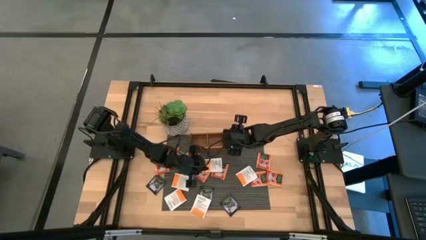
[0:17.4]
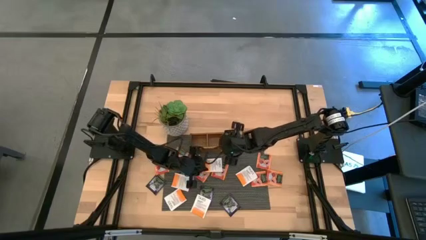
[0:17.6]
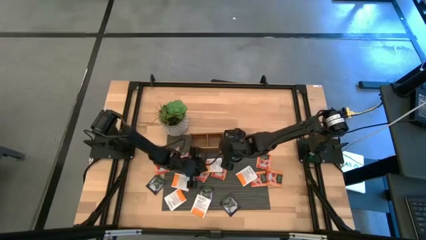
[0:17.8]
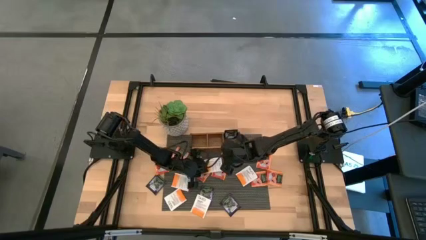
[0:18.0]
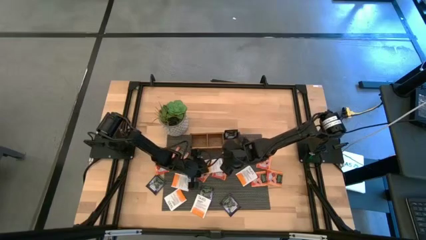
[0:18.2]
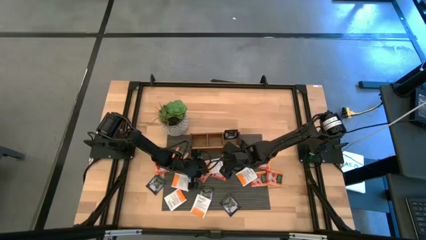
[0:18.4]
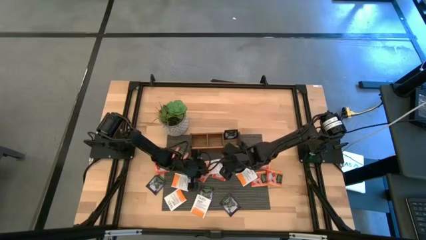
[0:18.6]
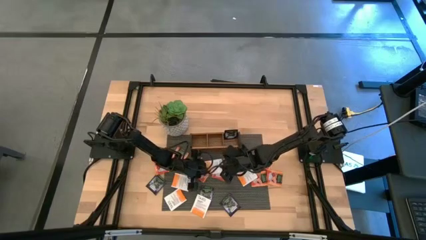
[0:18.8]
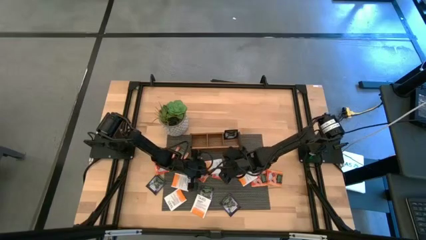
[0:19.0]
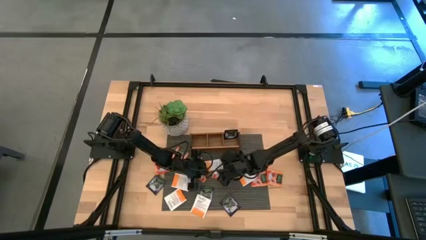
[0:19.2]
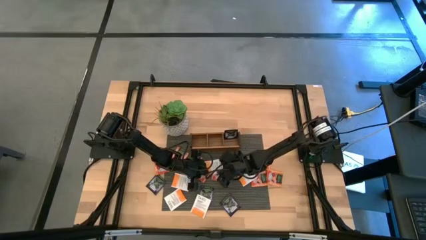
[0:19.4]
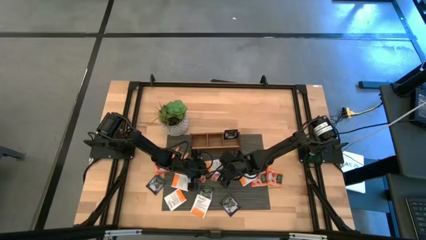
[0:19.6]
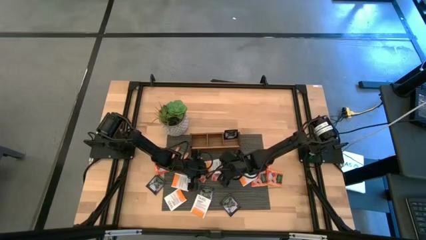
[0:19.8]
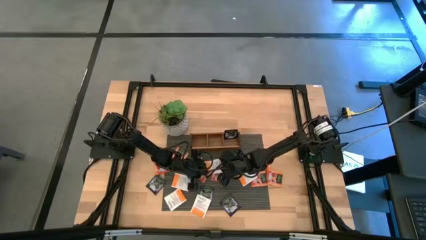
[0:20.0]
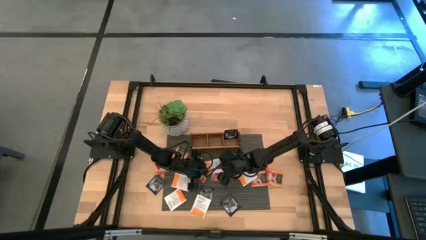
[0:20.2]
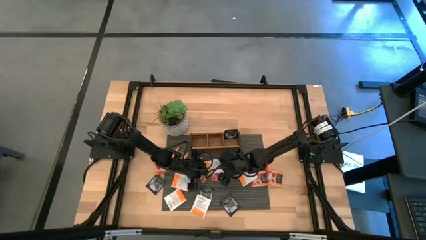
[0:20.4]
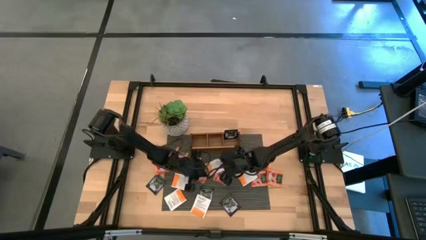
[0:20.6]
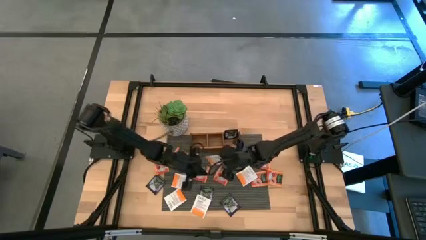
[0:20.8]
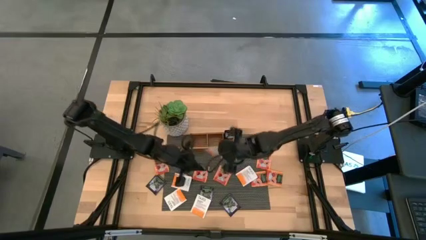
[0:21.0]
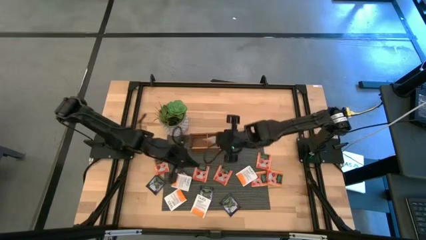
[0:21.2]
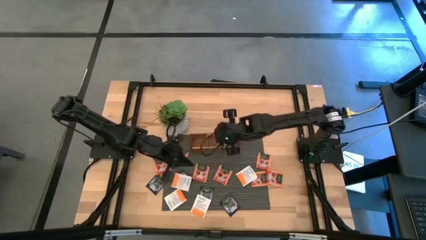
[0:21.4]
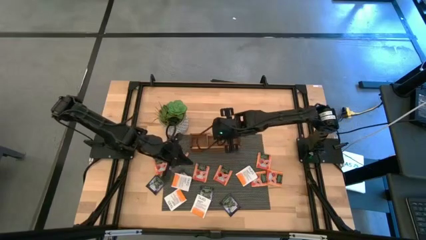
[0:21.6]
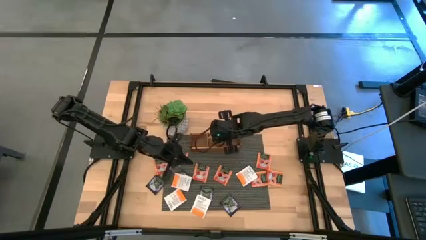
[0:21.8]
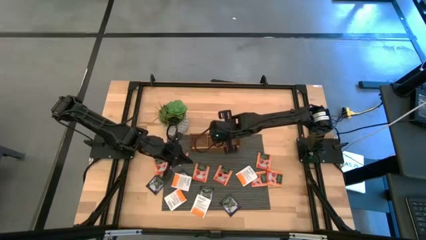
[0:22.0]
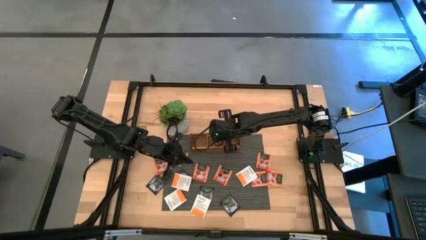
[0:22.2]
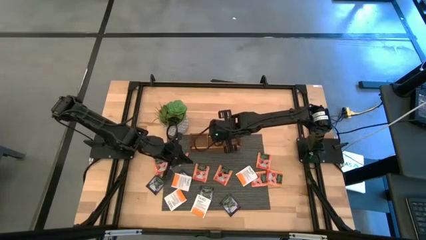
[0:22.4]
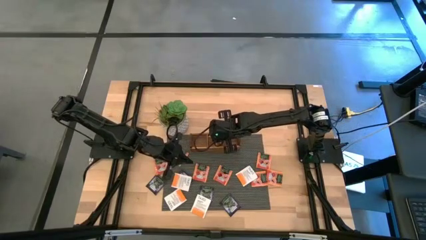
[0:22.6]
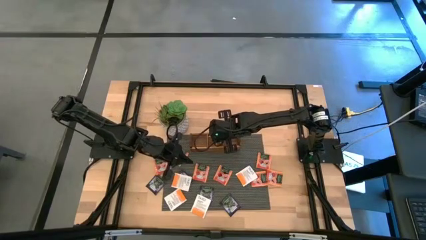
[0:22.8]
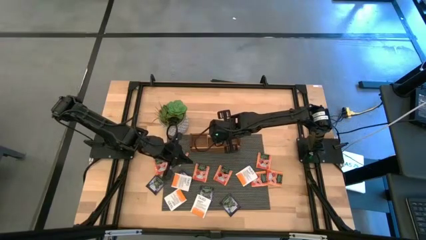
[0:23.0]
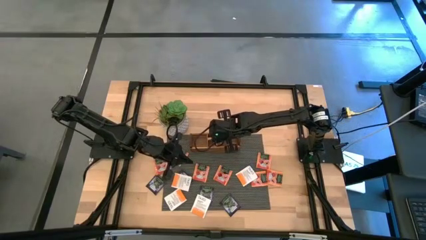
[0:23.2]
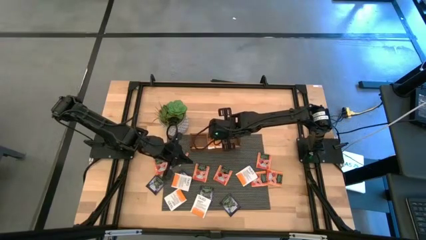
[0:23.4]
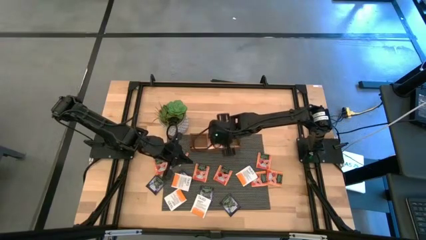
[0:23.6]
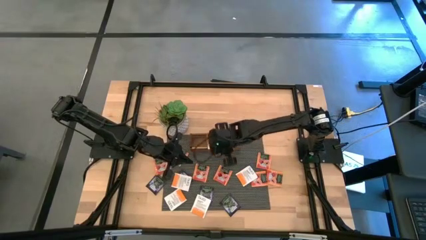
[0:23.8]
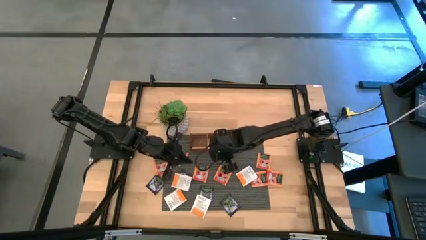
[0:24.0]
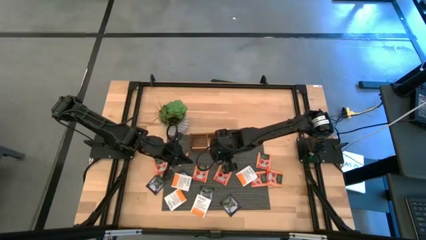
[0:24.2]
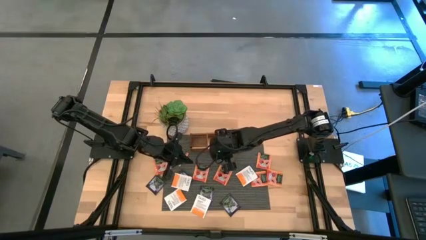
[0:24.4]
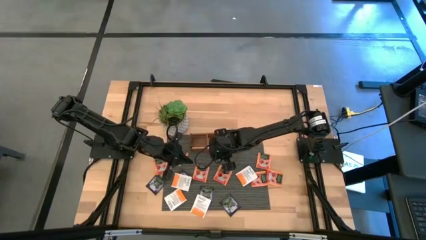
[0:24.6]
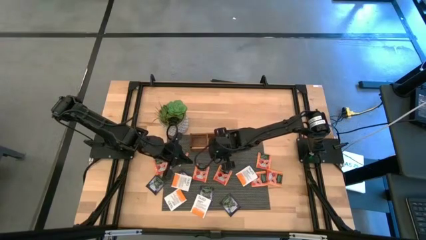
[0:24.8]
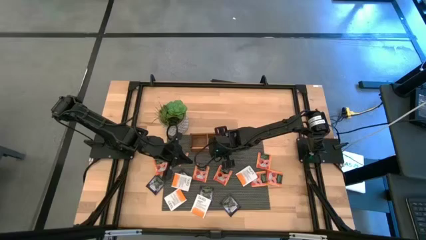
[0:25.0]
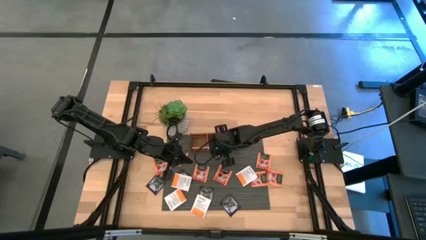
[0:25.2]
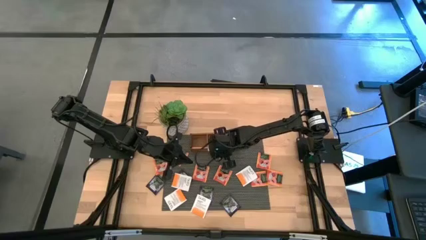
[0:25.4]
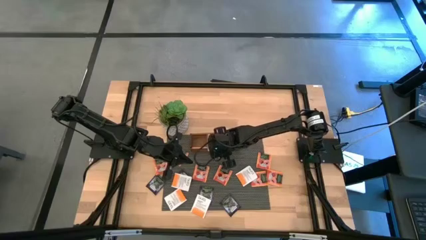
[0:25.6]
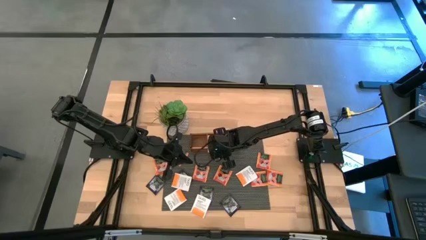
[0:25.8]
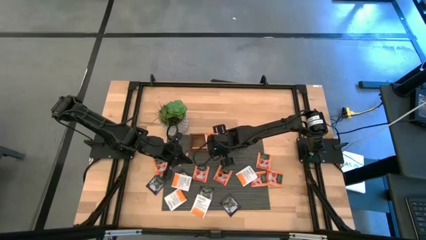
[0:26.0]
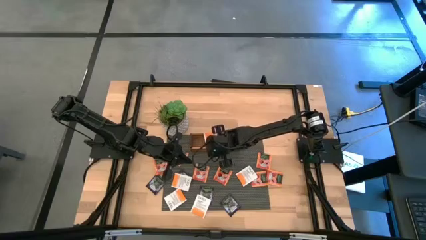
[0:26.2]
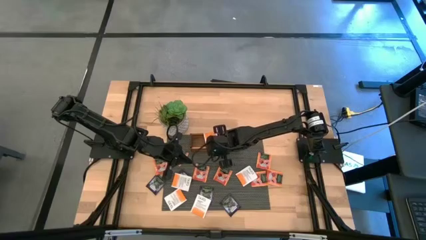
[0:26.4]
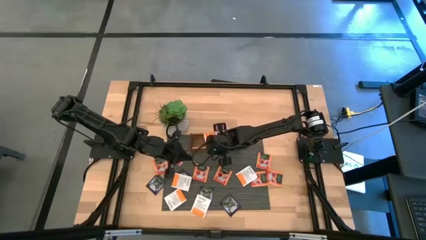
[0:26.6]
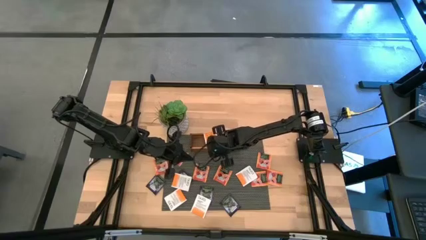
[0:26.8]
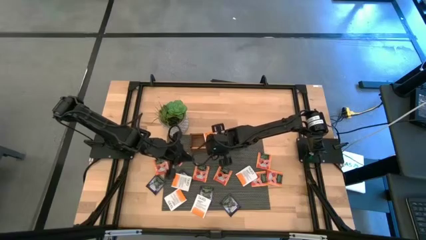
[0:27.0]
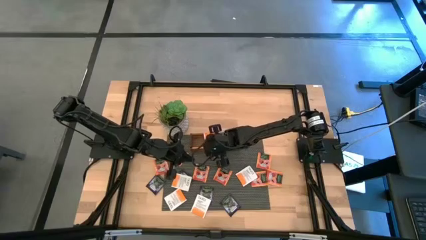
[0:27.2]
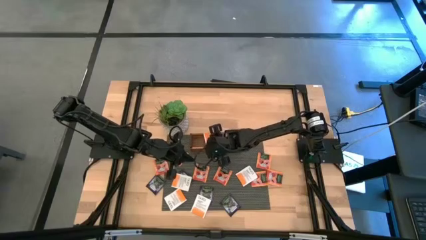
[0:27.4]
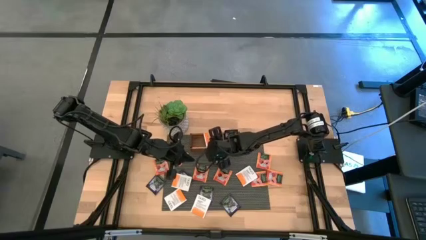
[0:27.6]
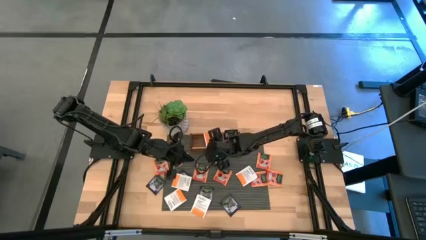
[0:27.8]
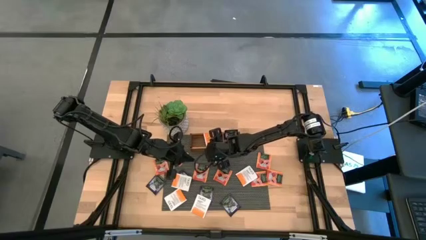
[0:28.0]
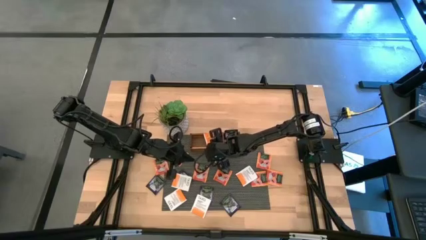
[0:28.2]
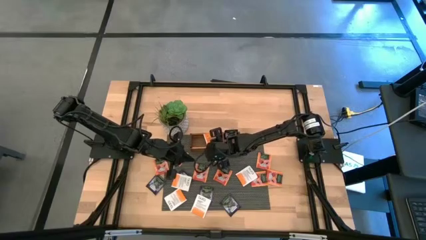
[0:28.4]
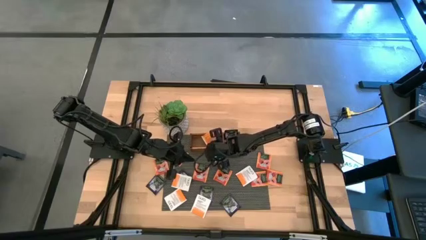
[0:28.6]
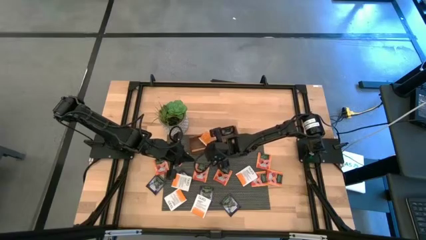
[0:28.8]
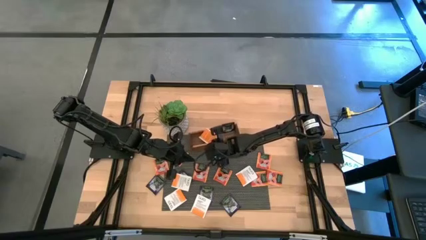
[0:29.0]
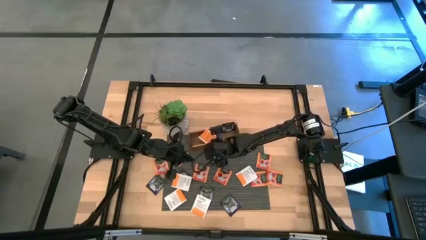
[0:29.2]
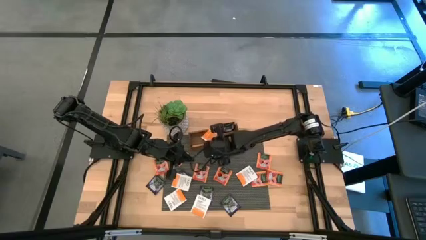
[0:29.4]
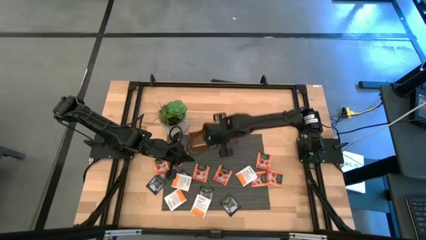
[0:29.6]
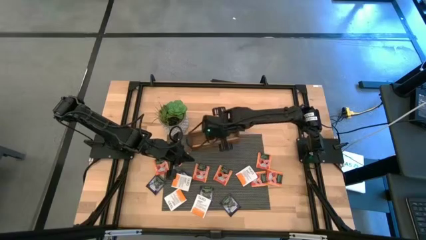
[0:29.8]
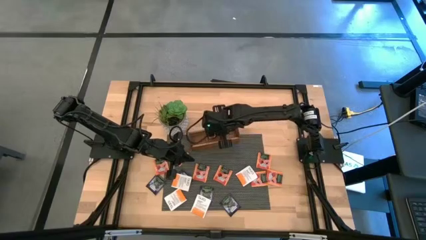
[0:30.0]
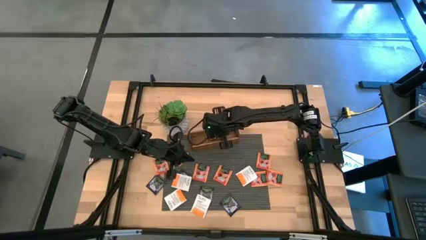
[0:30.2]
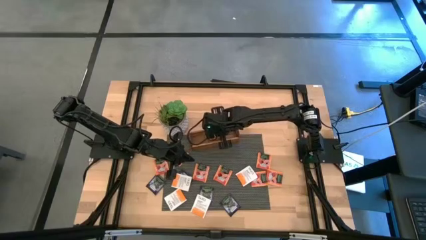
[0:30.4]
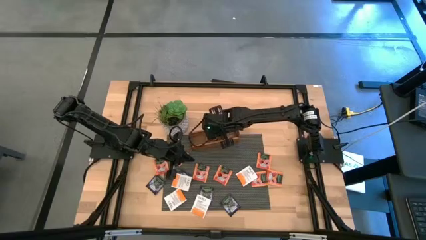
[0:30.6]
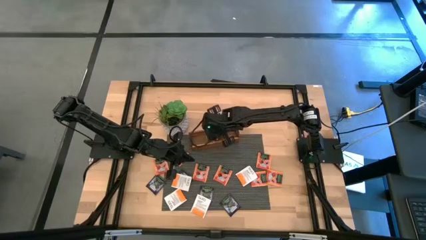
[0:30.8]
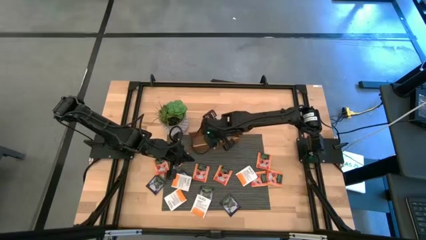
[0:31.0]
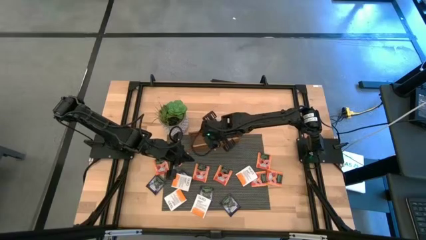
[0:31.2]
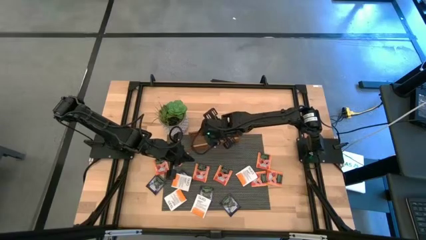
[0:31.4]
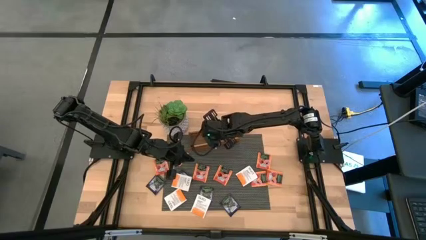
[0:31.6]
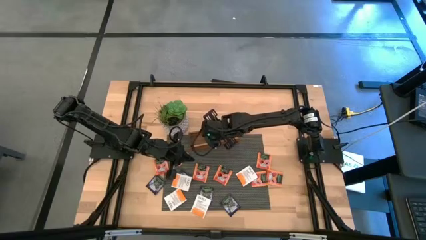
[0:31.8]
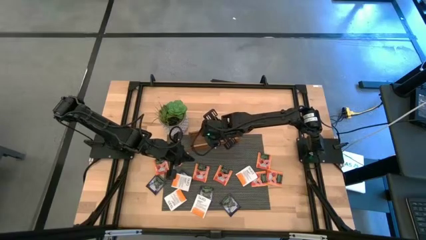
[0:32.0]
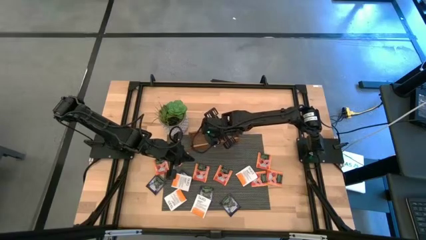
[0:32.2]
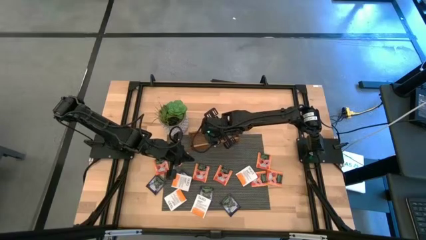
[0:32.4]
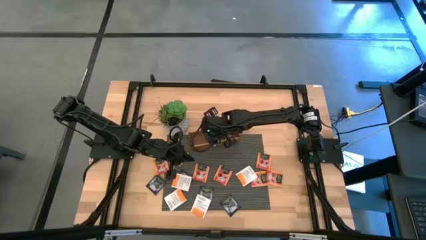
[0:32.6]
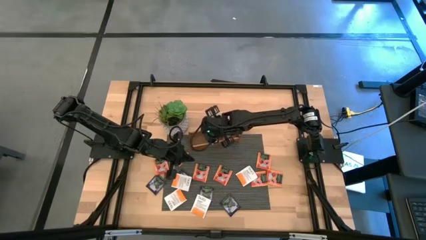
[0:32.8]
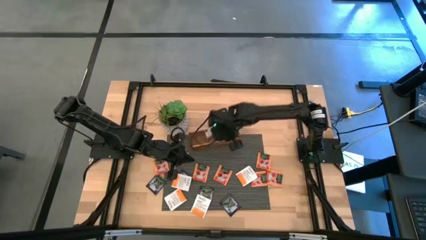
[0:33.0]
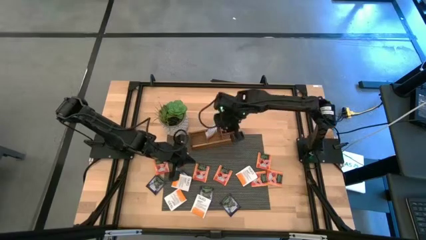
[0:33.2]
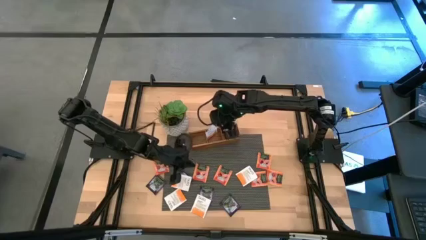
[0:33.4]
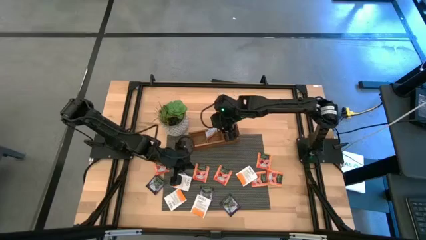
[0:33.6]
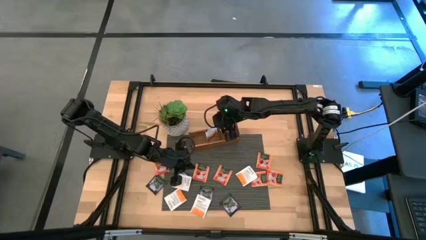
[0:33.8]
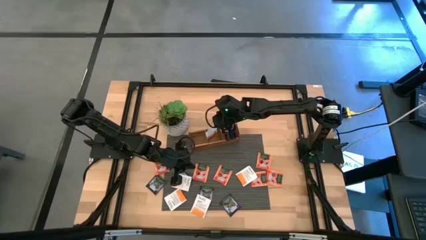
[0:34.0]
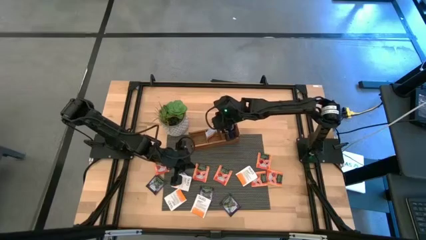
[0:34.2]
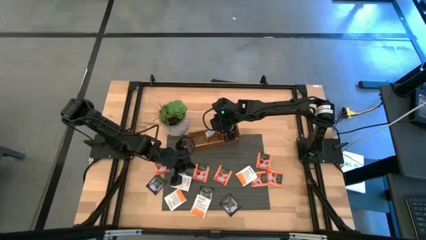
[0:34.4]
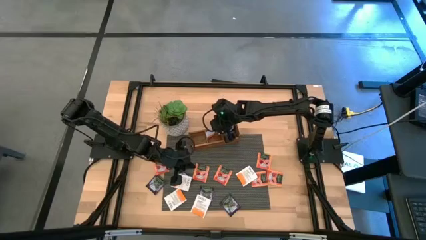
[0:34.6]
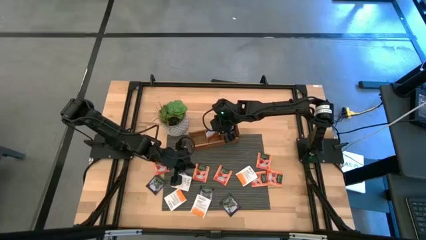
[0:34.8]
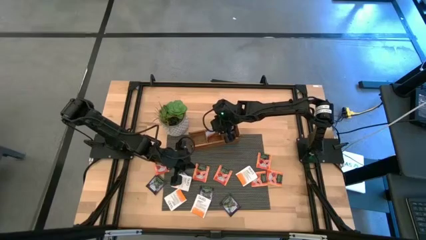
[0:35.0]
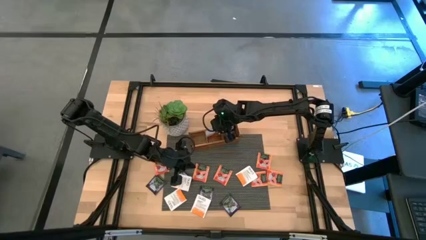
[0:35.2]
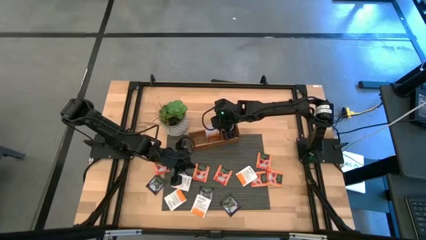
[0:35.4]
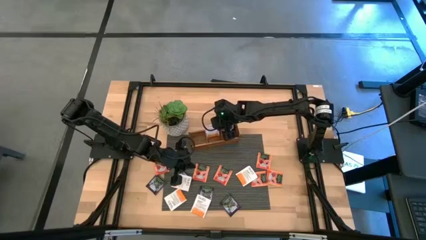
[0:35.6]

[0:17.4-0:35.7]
Task: Pick & Place Tea
Put the white tea bag into the middle slot of the wooden organizer
